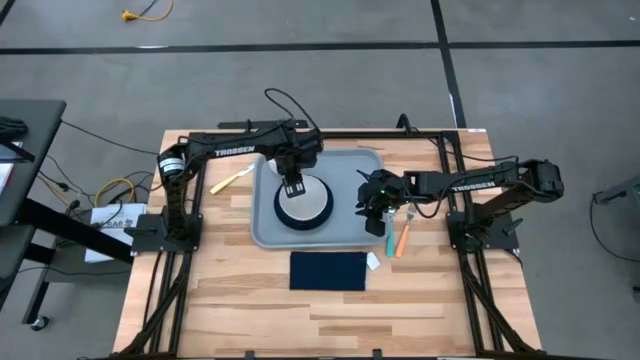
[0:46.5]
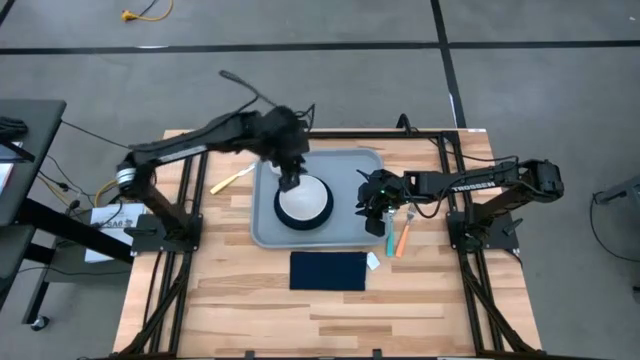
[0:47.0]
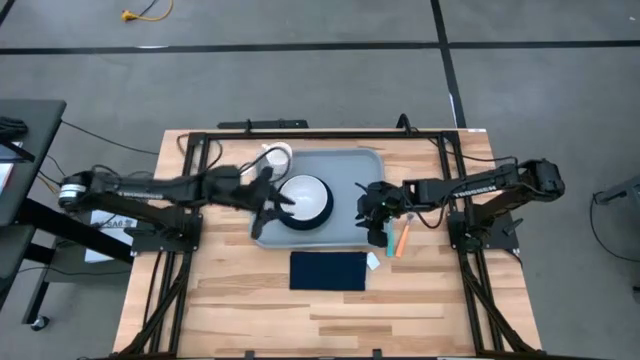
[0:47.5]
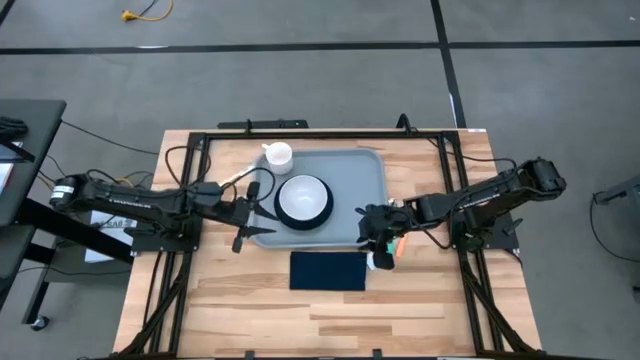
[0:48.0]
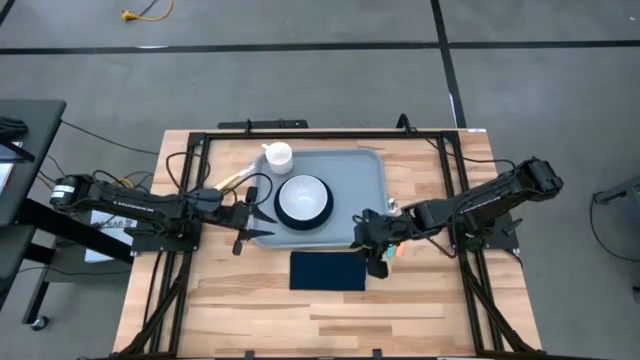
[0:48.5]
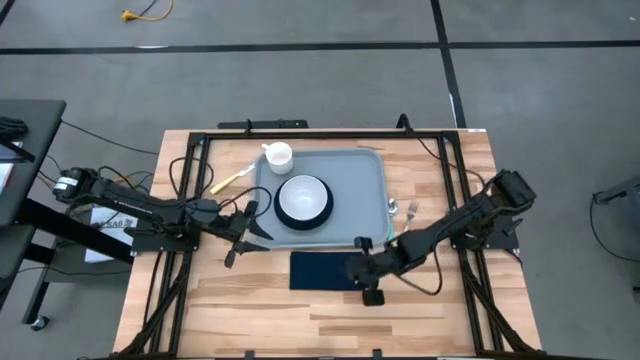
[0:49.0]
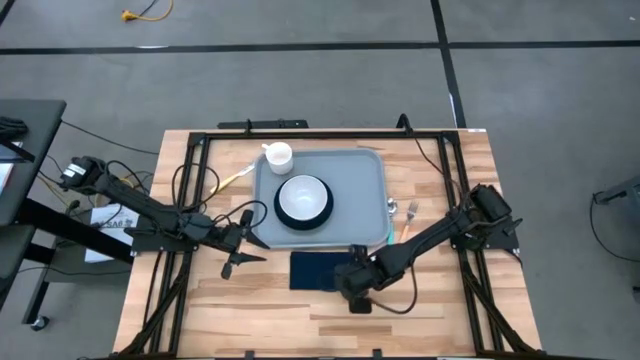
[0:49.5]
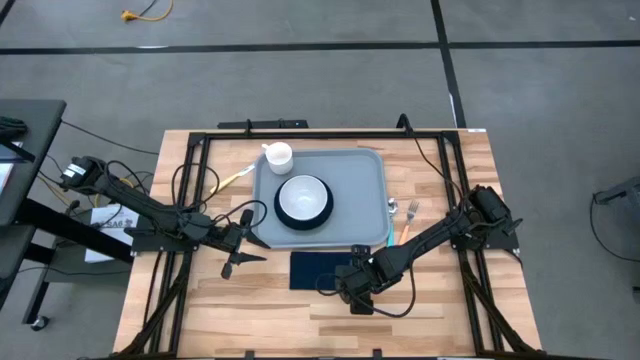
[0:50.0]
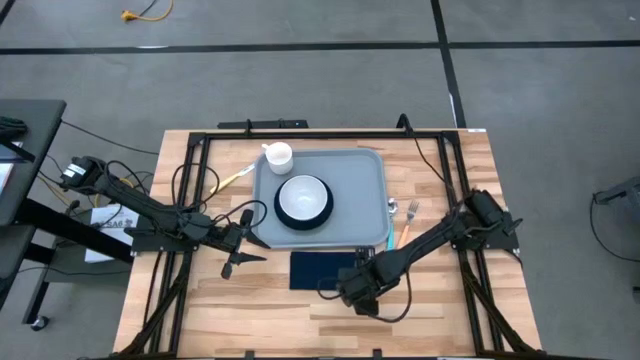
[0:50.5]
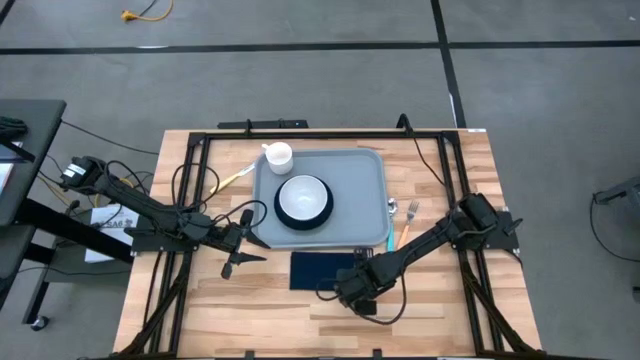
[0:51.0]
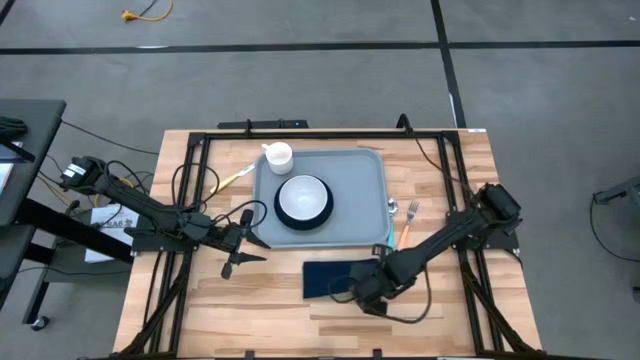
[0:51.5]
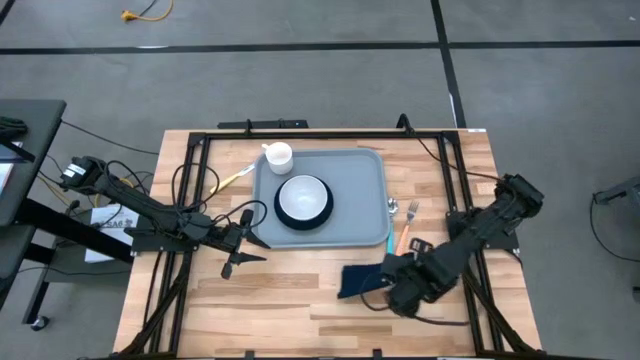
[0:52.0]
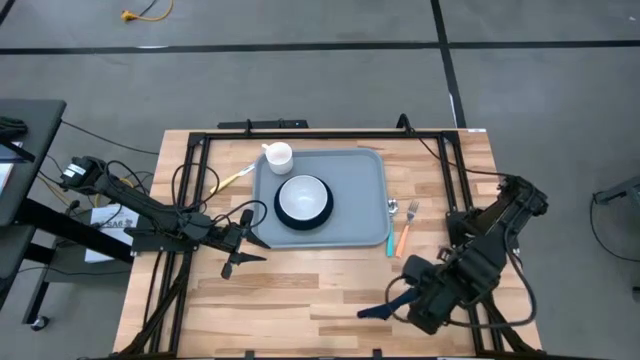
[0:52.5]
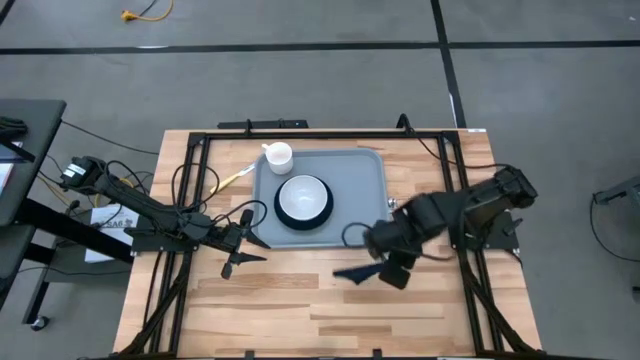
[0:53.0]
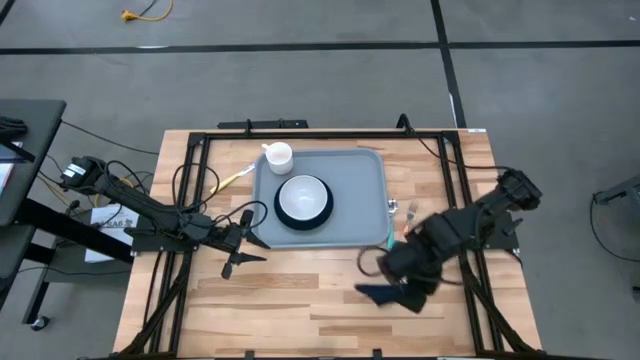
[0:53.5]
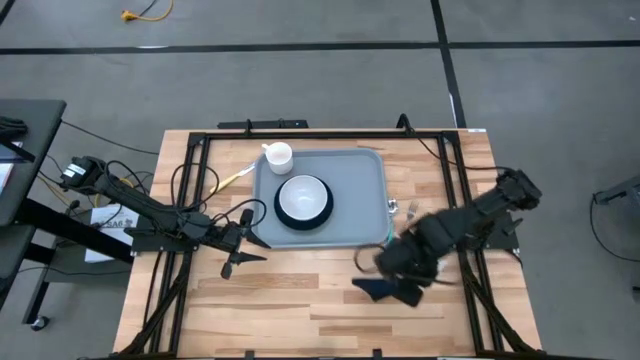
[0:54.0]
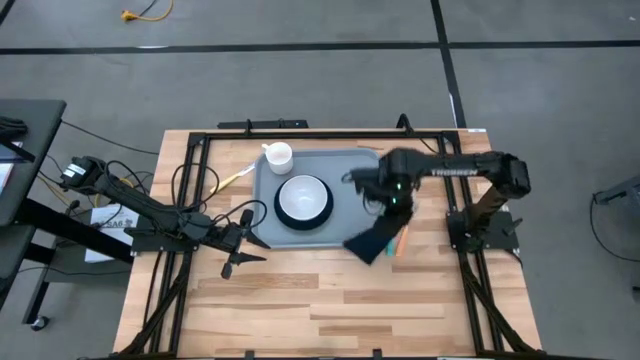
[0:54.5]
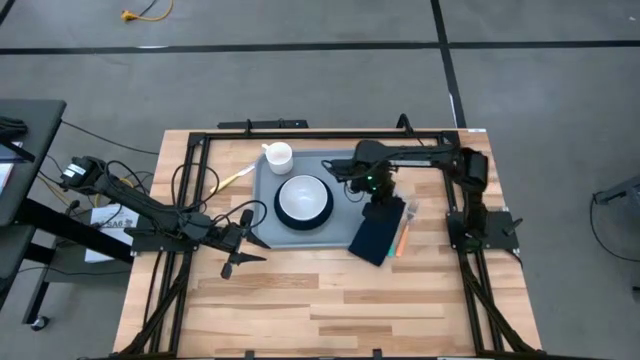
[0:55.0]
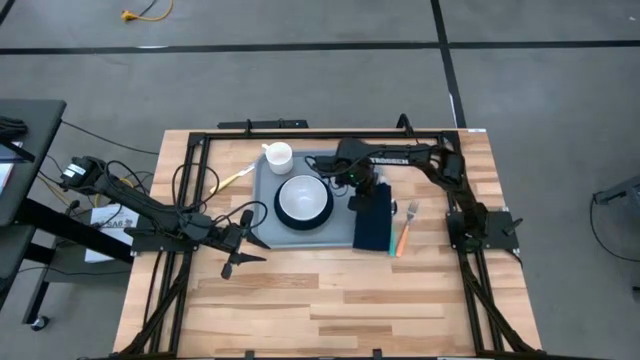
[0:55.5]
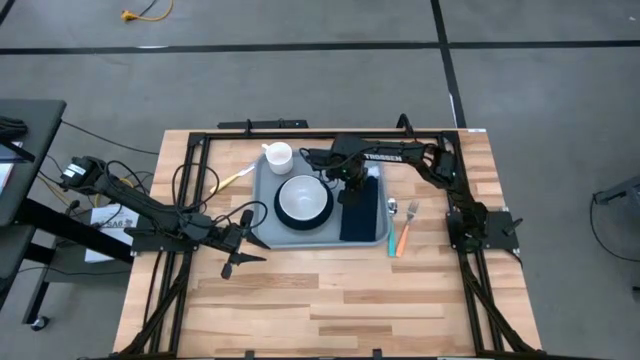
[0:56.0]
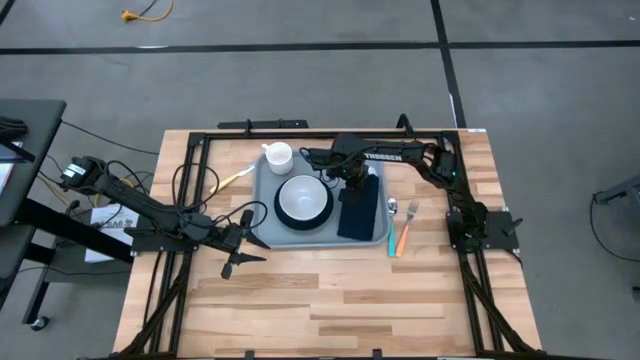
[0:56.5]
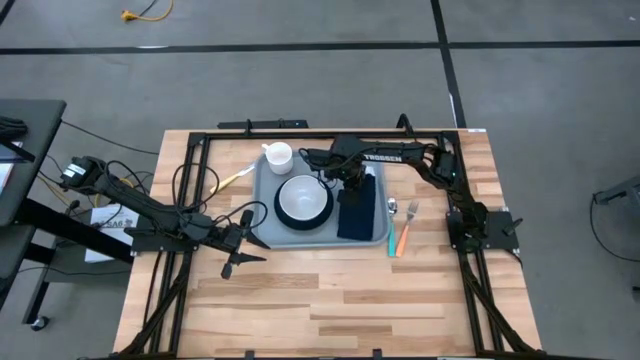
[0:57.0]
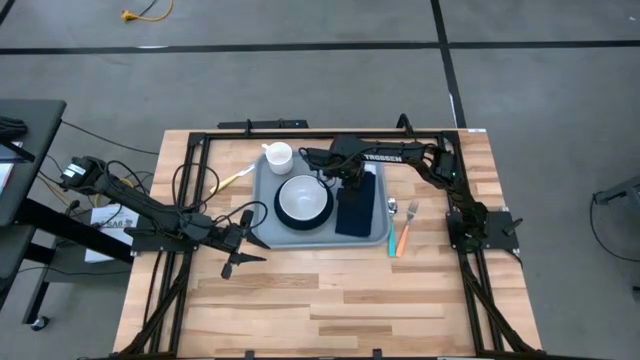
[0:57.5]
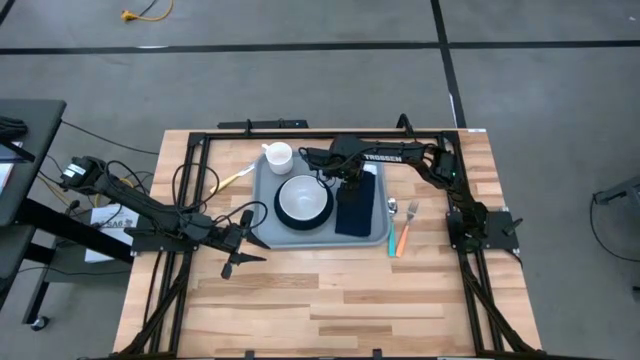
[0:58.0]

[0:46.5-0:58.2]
Task: Set up tray
Put the black napkin on the gray tray to the right of the black plate

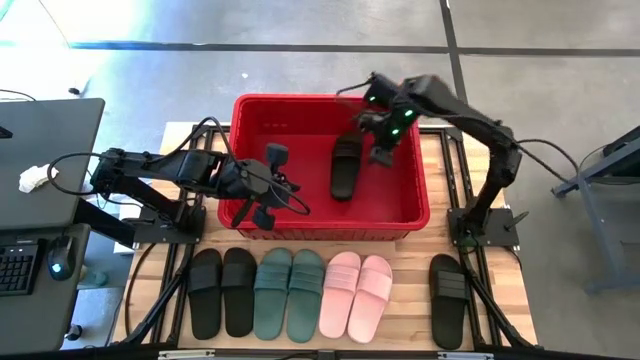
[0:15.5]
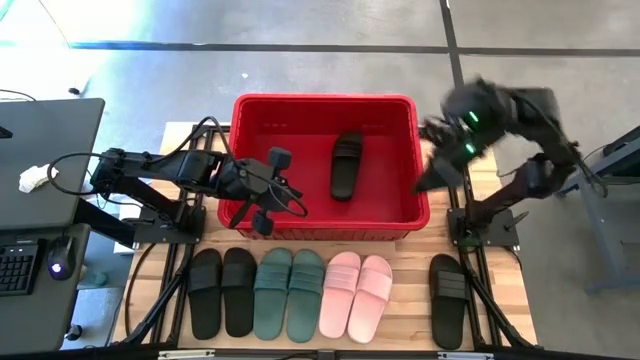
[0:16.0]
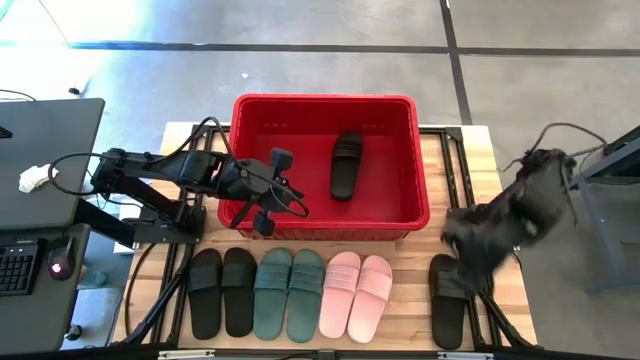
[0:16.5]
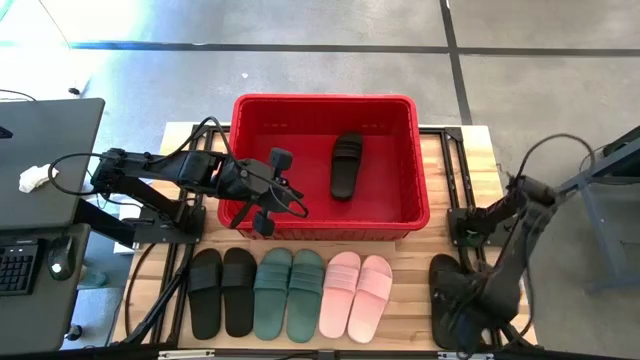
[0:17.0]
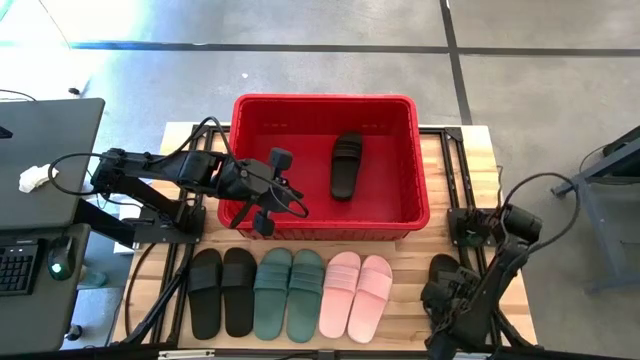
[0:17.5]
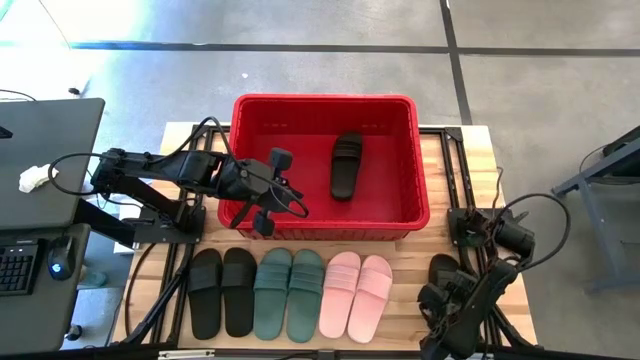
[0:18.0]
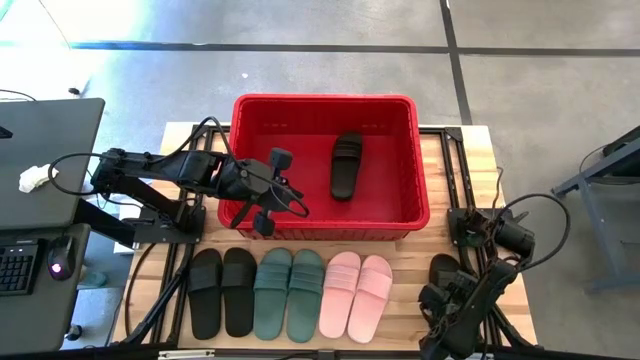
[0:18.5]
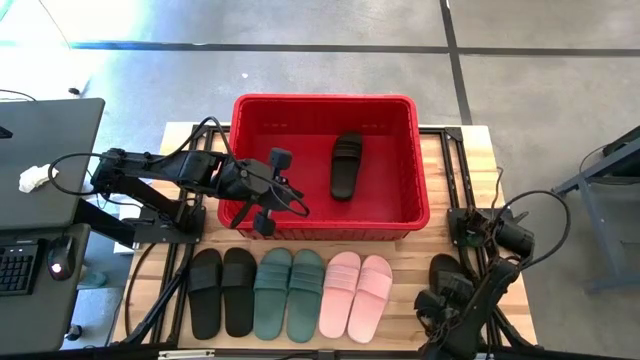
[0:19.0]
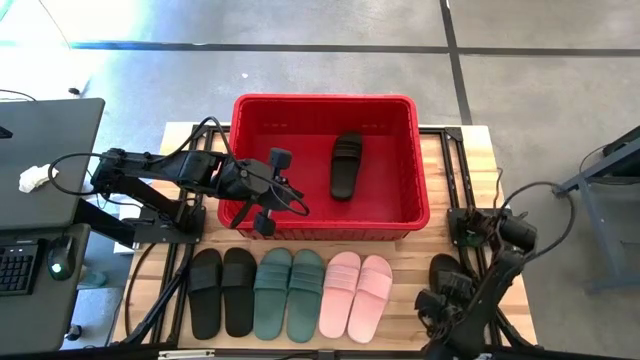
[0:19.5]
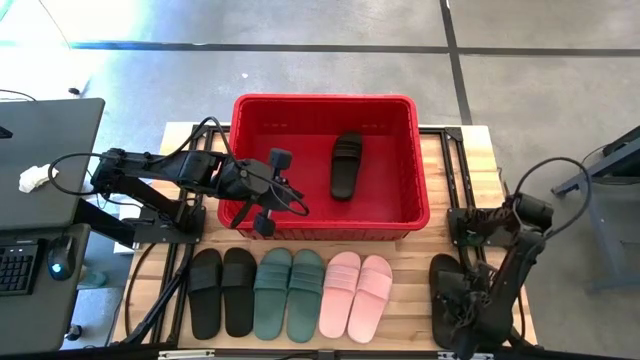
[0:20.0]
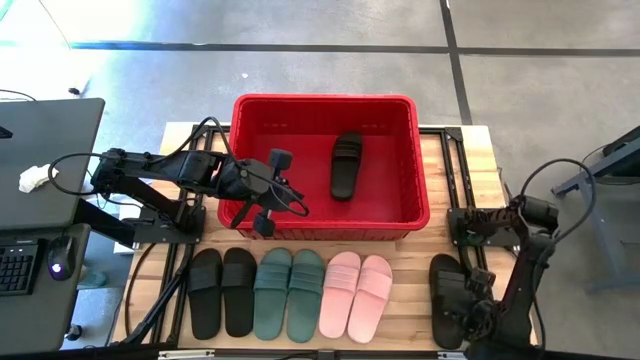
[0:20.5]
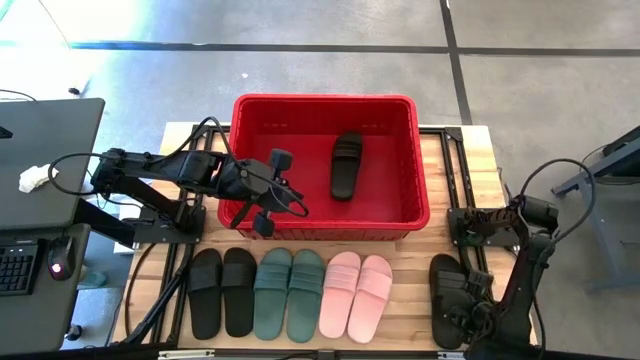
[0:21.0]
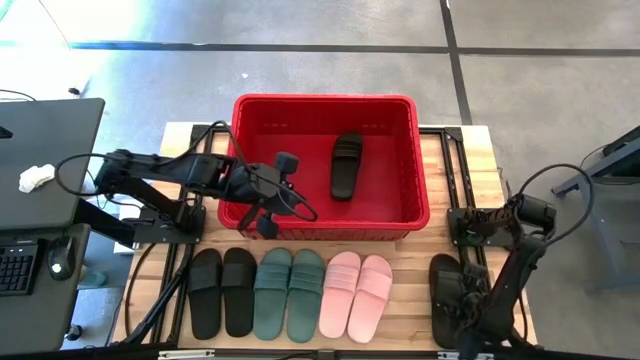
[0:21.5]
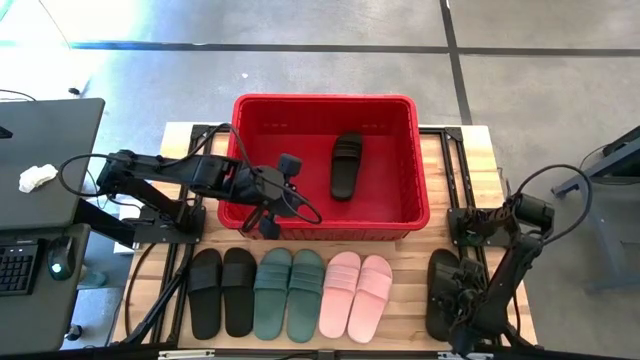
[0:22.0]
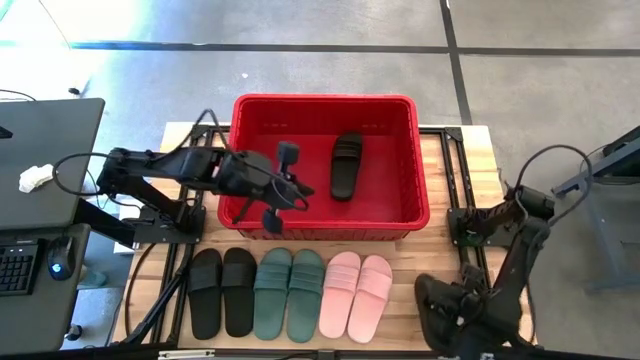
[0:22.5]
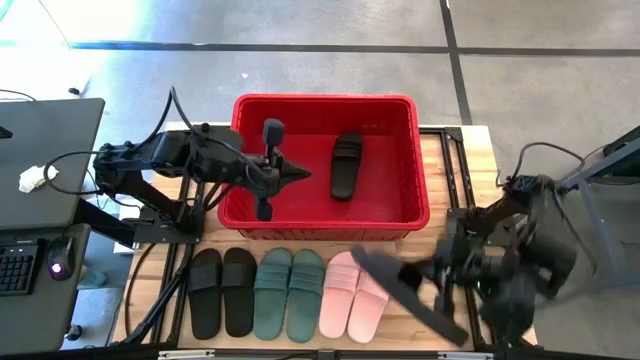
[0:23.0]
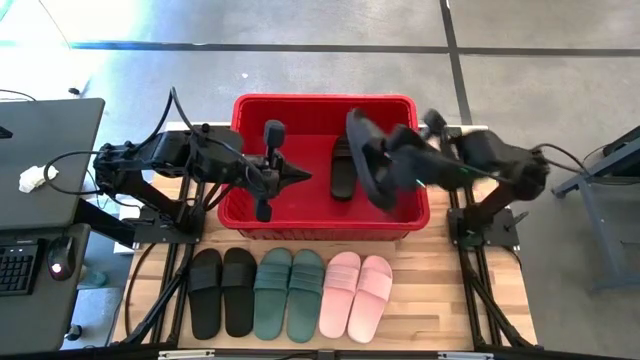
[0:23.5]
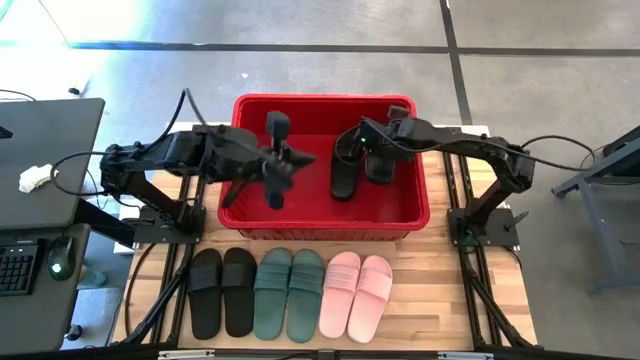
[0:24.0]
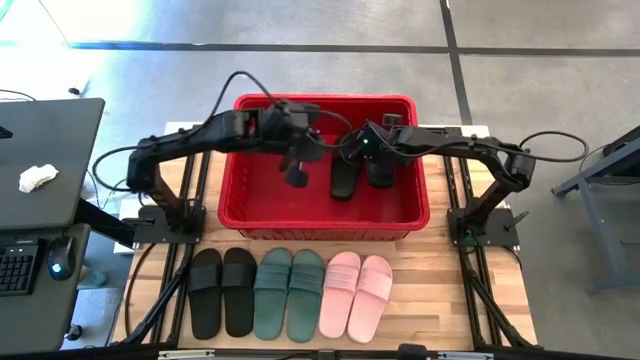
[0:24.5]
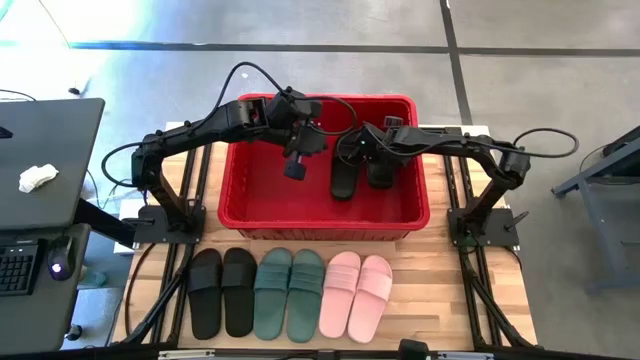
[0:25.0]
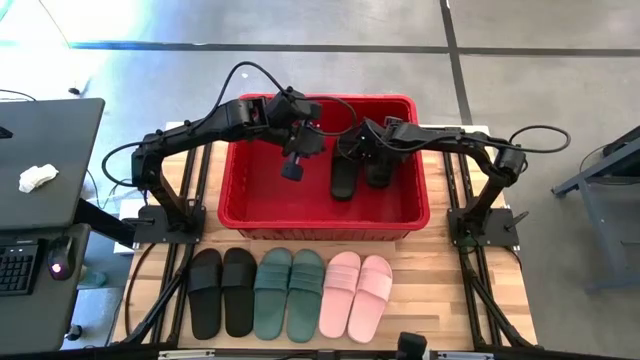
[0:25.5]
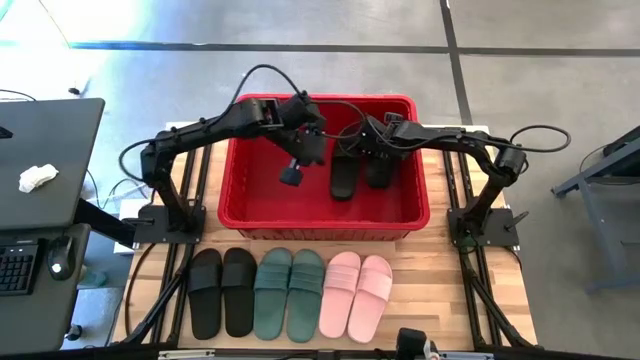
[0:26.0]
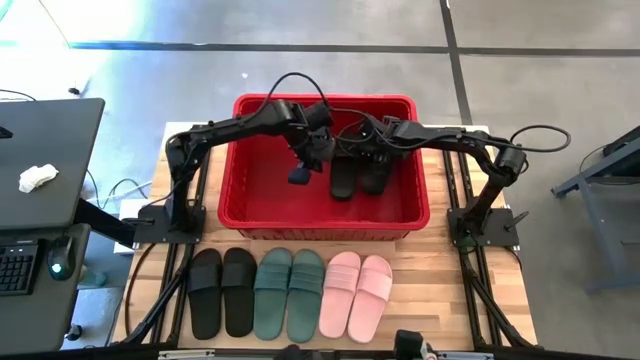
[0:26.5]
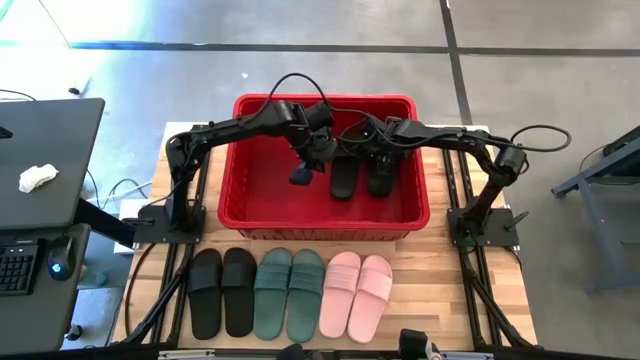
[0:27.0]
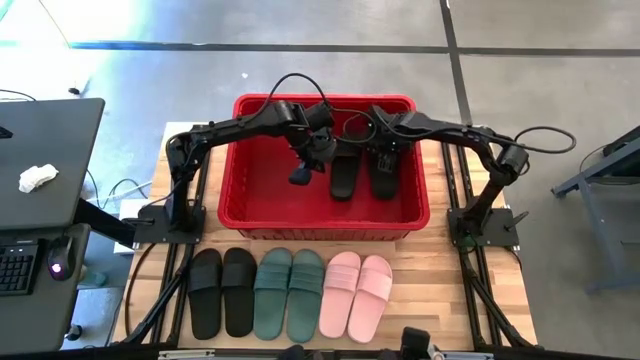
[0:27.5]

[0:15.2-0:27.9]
Task: Pick and place slides into bin
Put the black slide into the red bin
